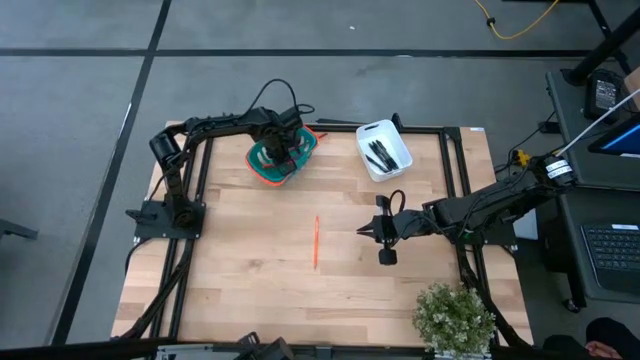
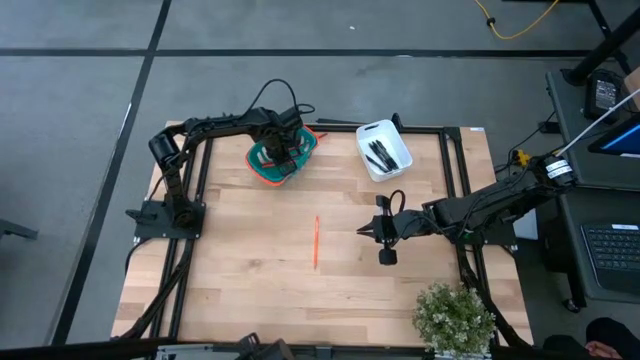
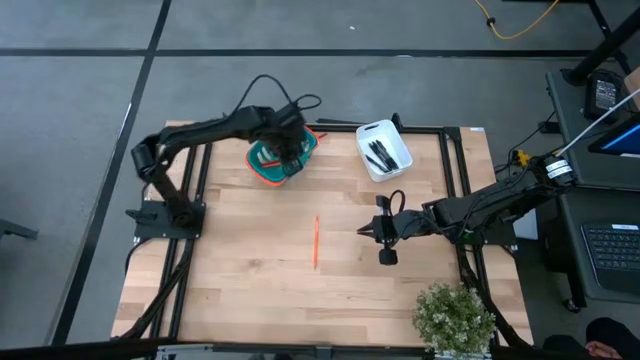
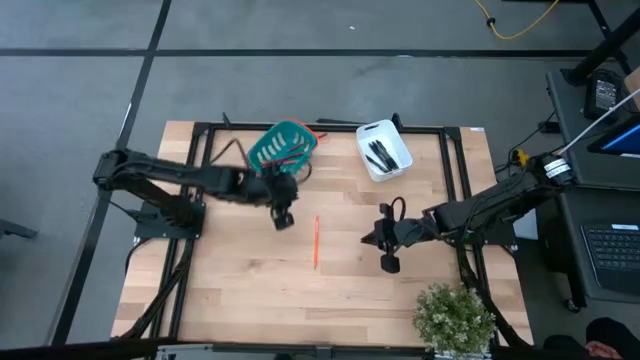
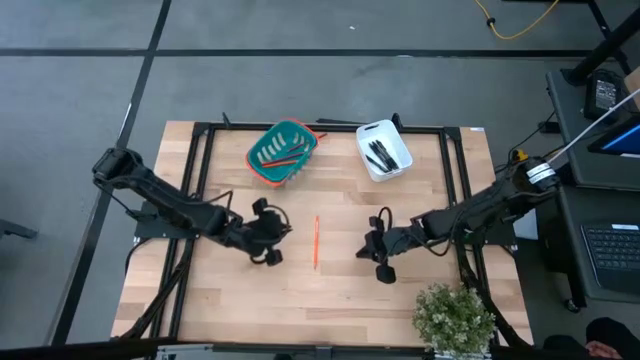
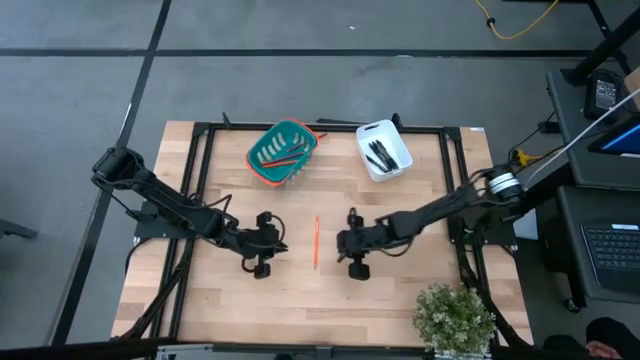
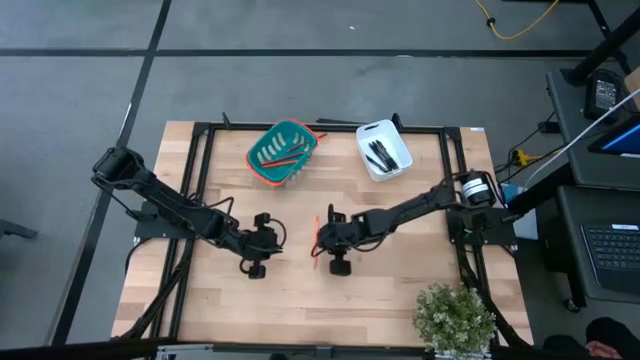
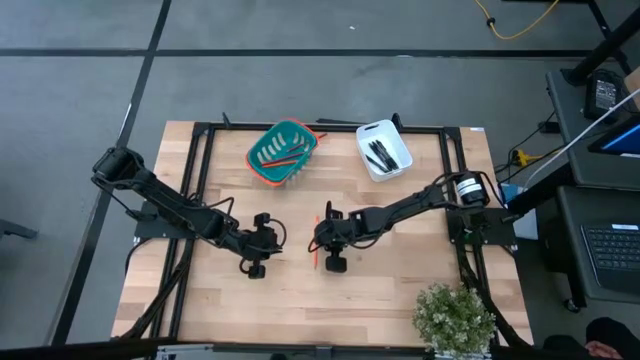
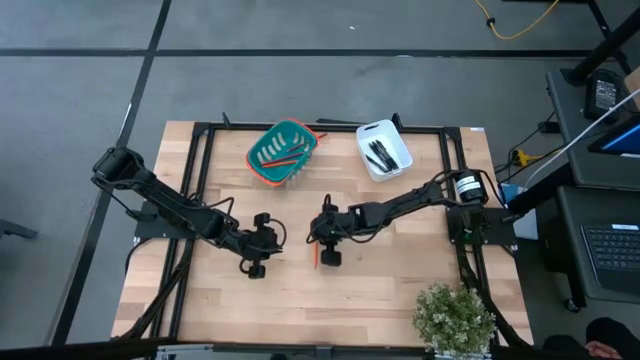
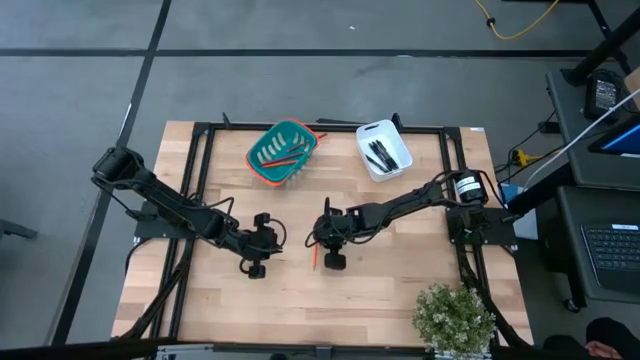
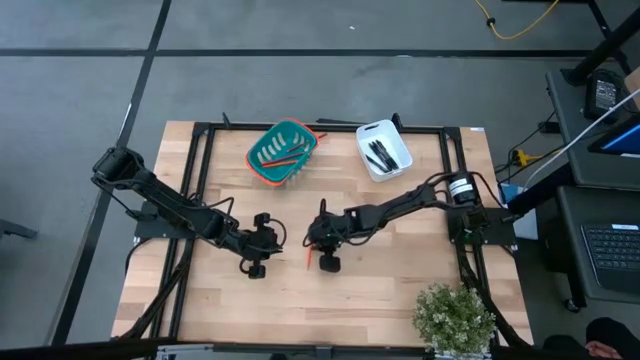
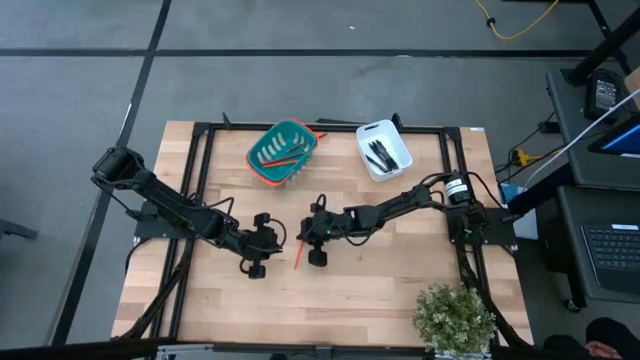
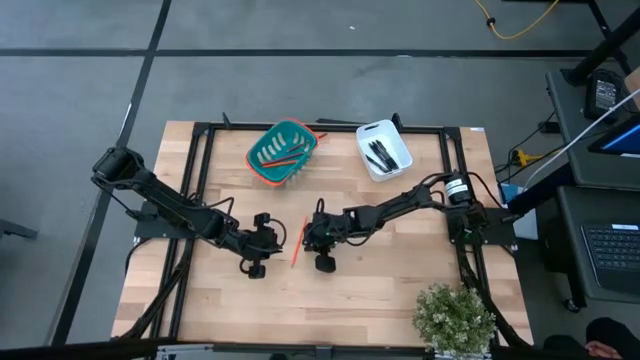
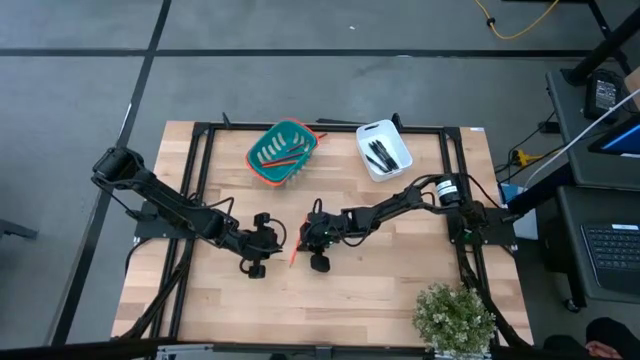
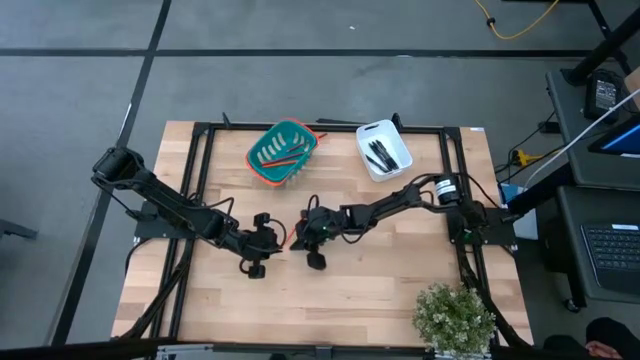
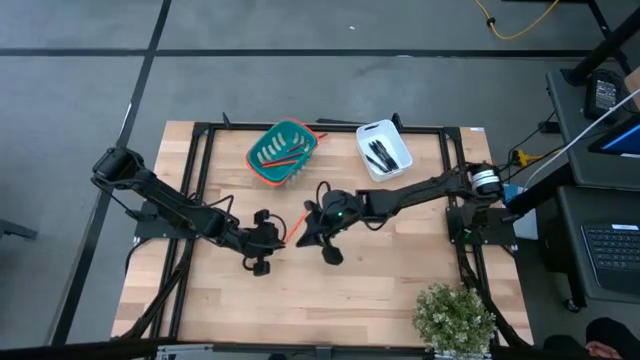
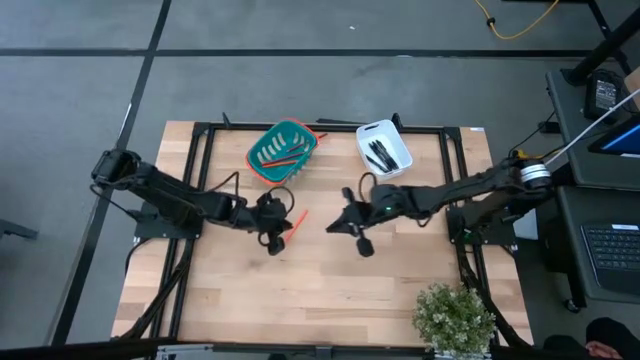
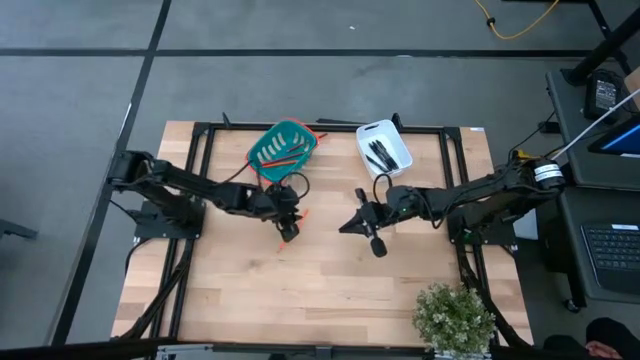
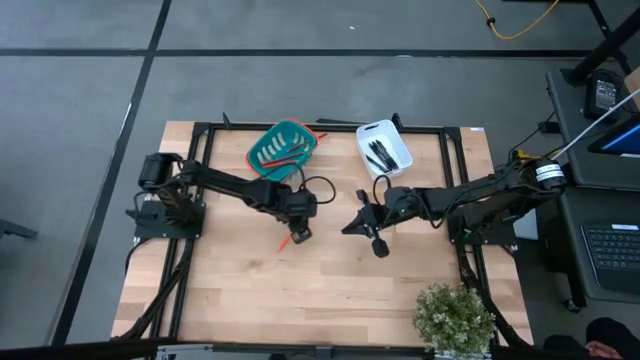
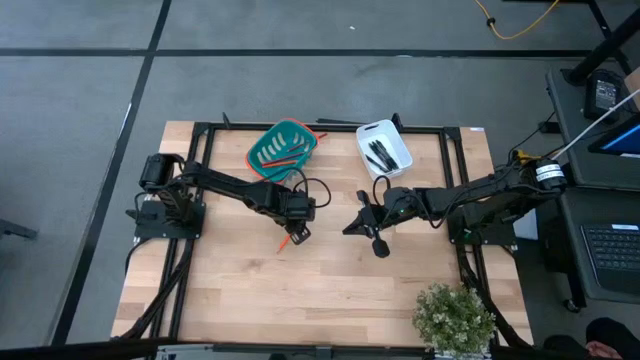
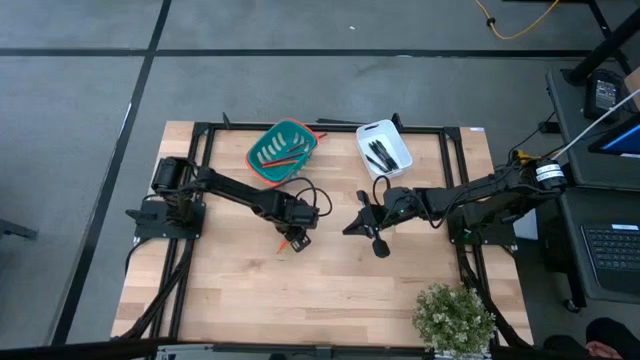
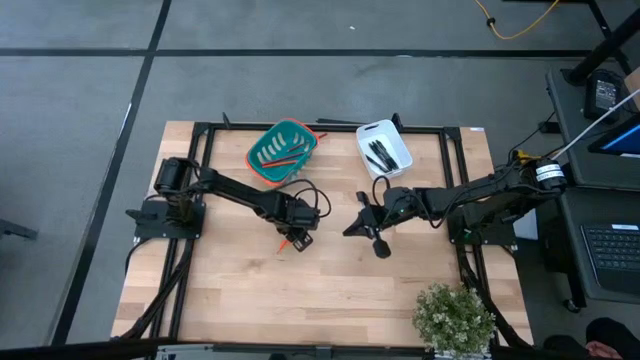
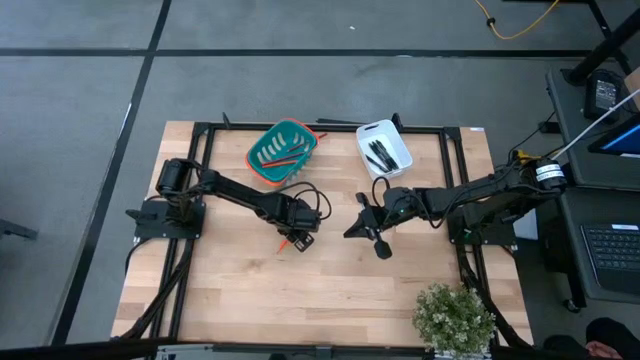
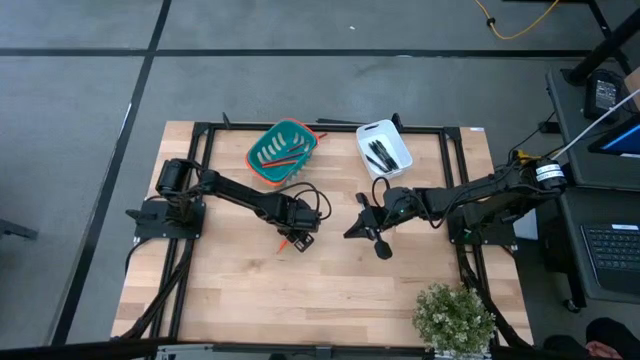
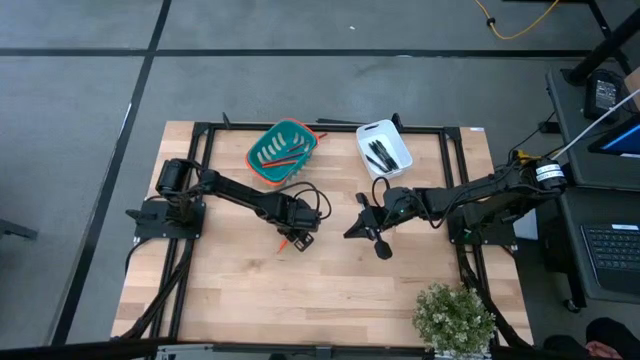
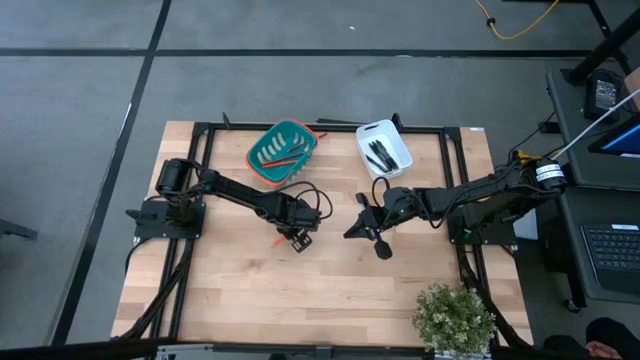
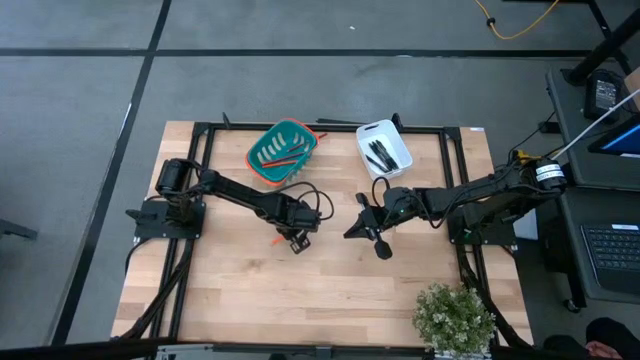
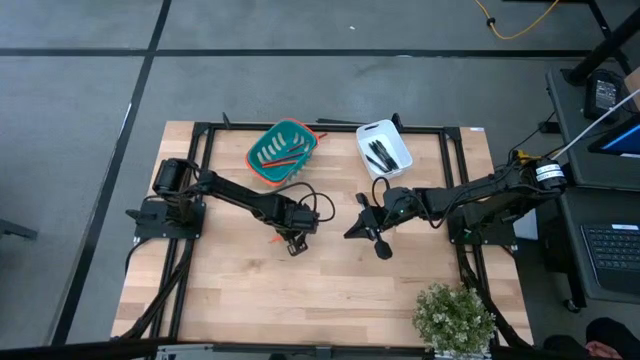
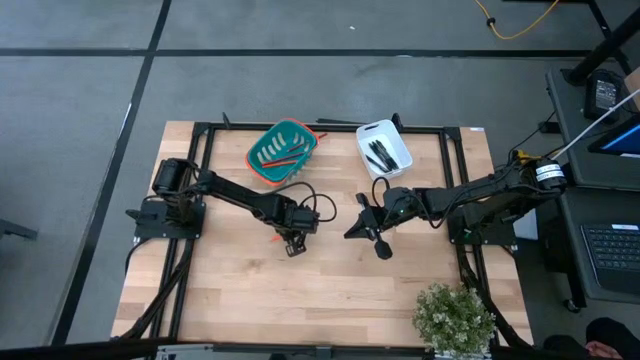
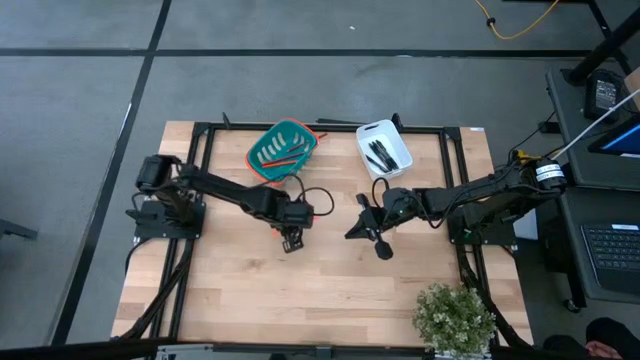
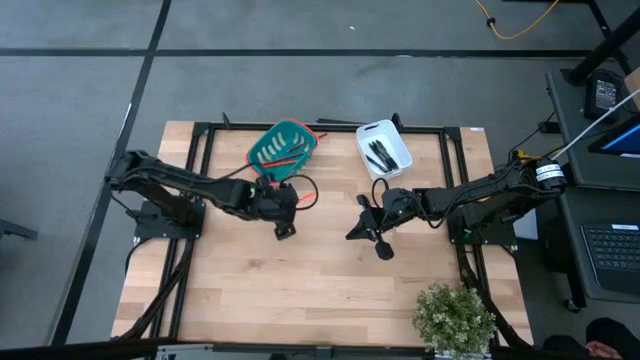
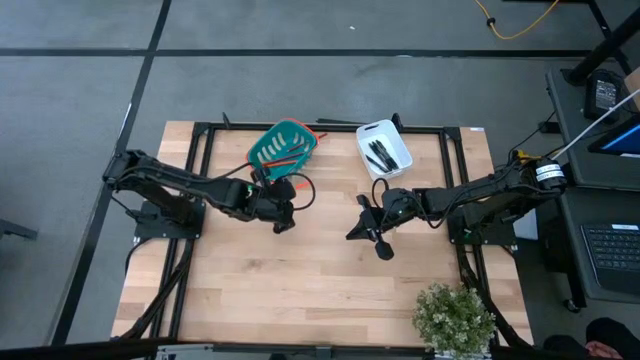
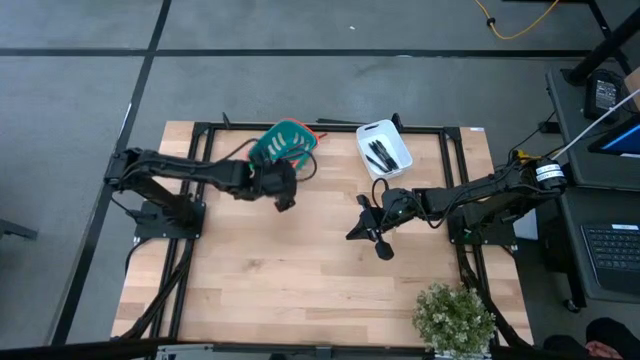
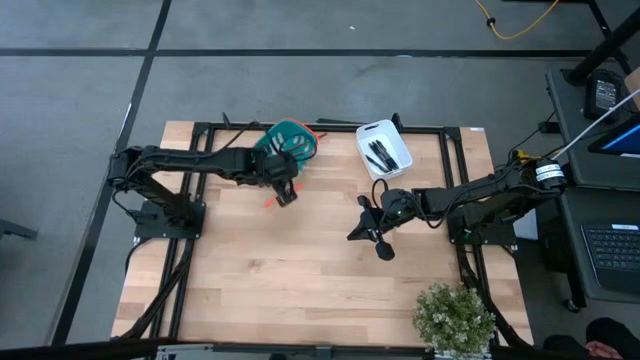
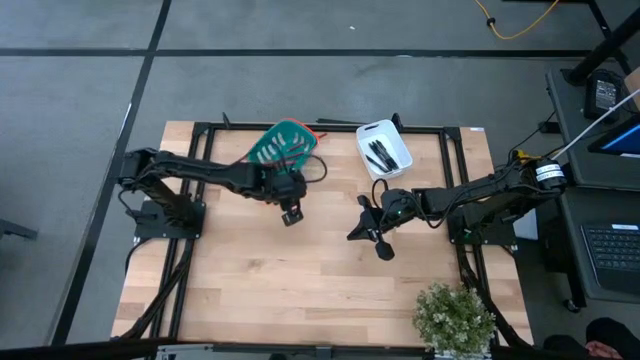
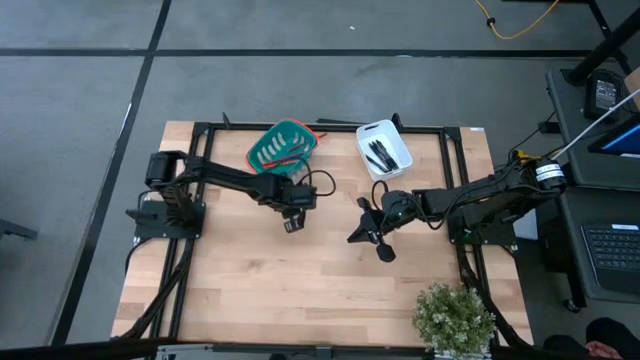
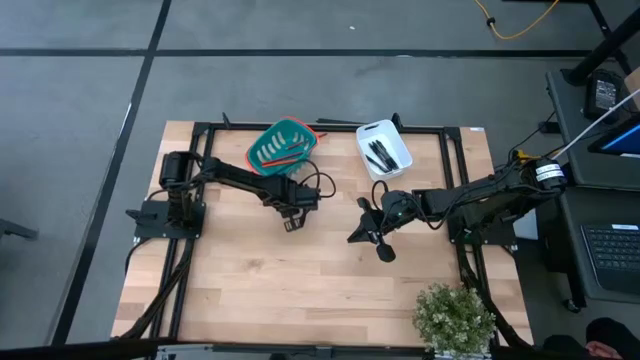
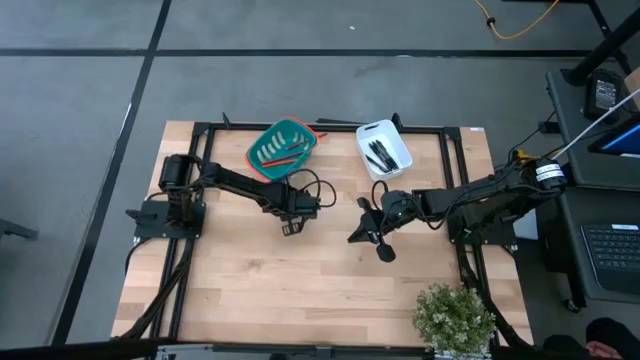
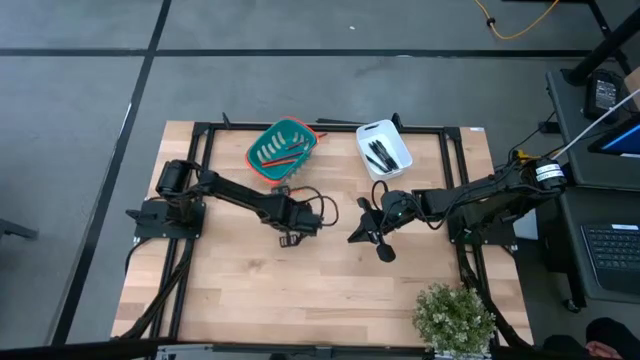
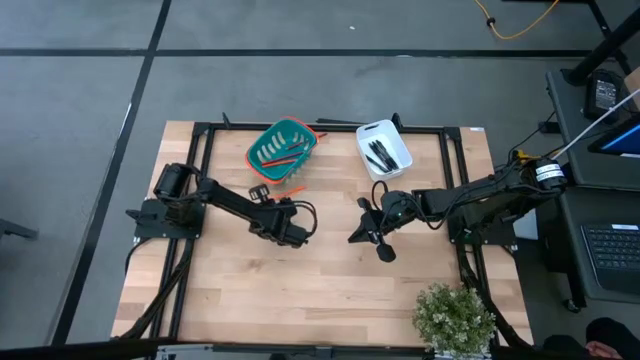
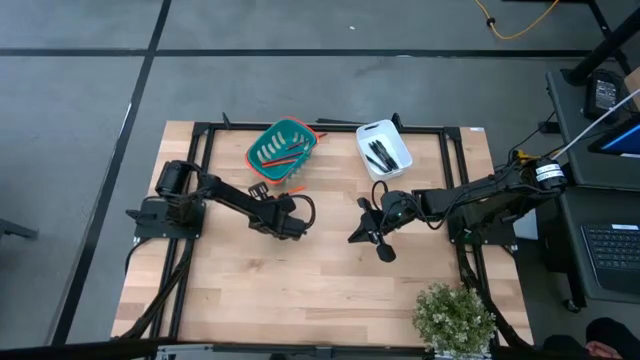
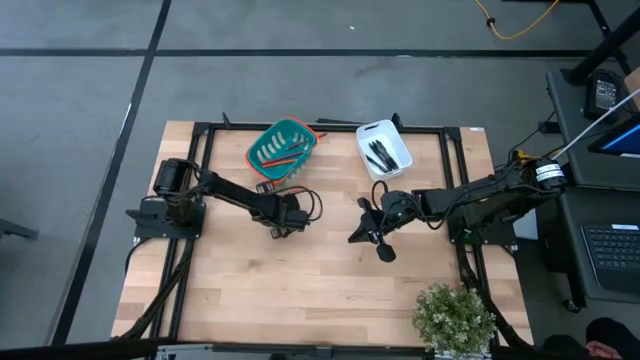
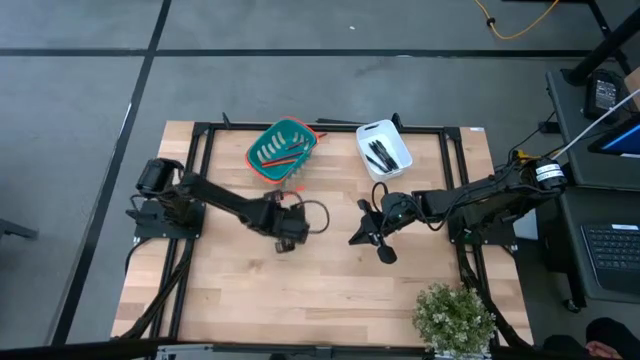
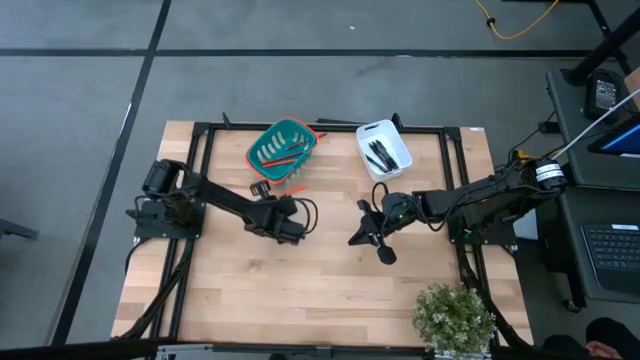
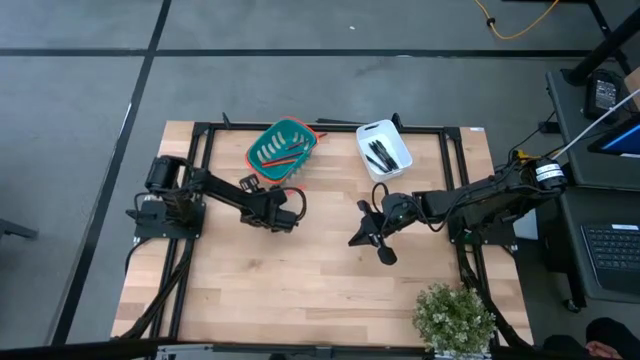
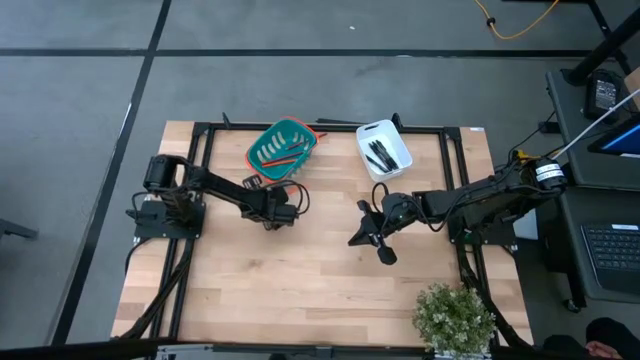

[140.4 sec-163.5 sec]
Task: Sort pens & pencils
Put the orange pencil into the blue bin
